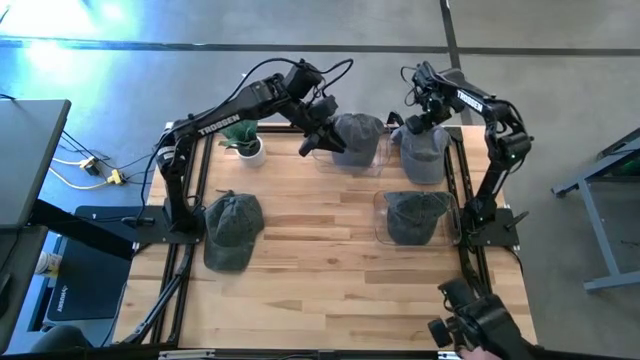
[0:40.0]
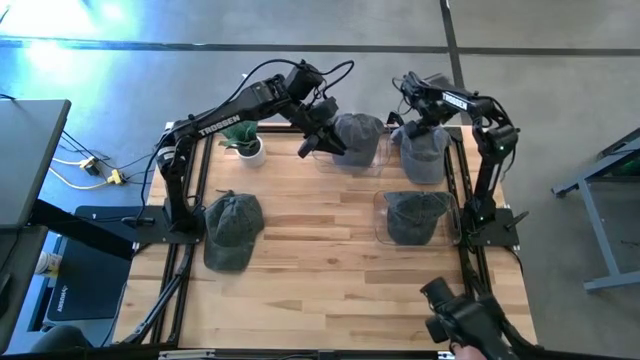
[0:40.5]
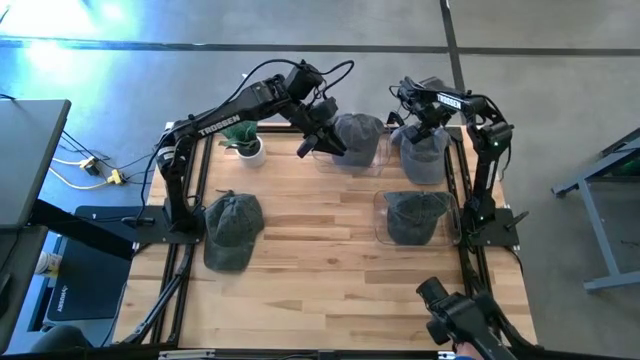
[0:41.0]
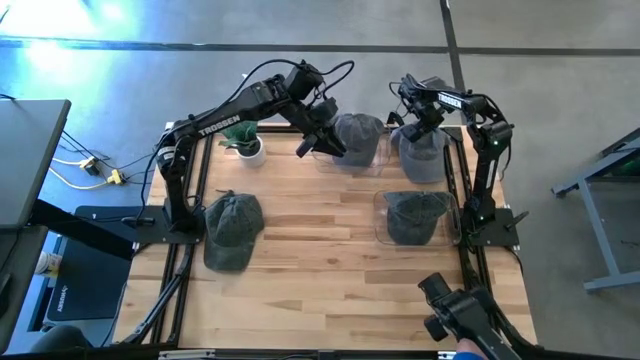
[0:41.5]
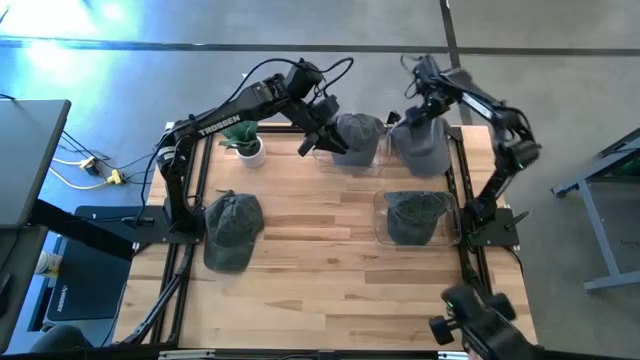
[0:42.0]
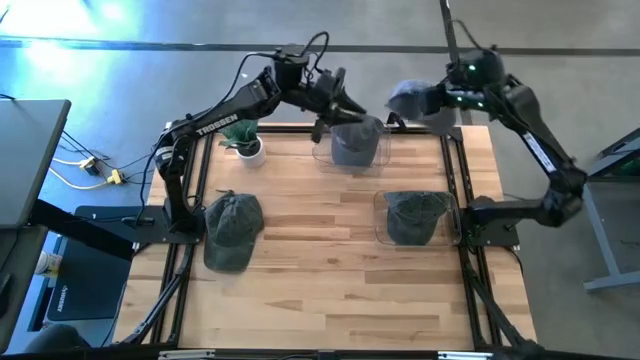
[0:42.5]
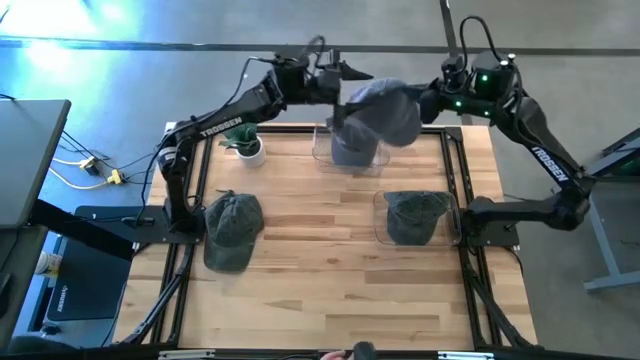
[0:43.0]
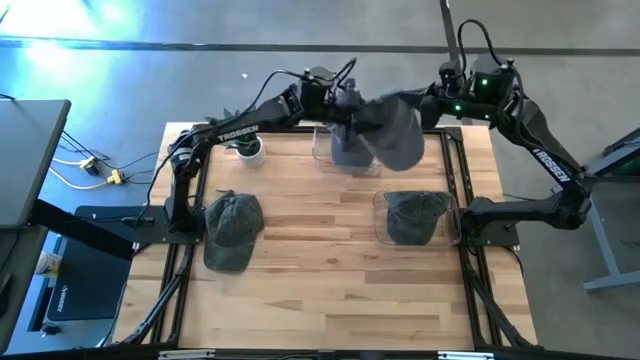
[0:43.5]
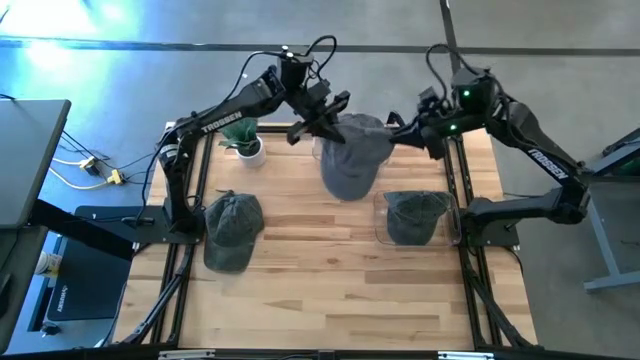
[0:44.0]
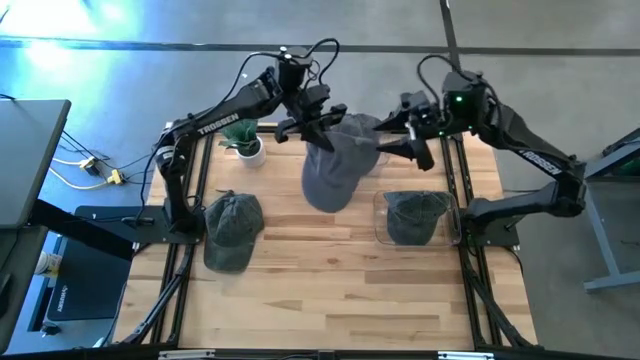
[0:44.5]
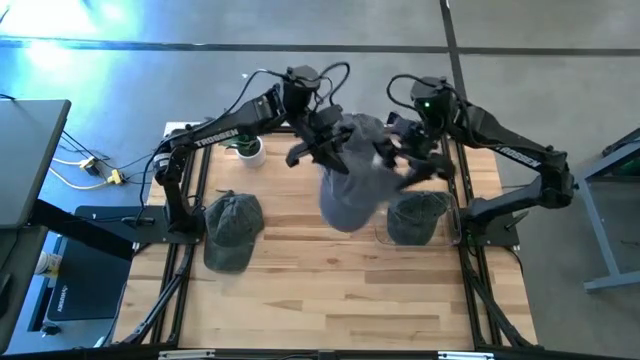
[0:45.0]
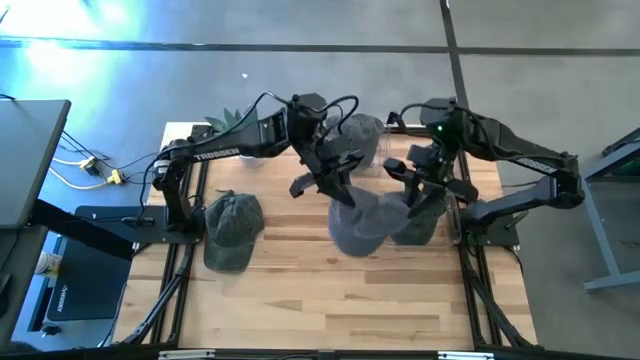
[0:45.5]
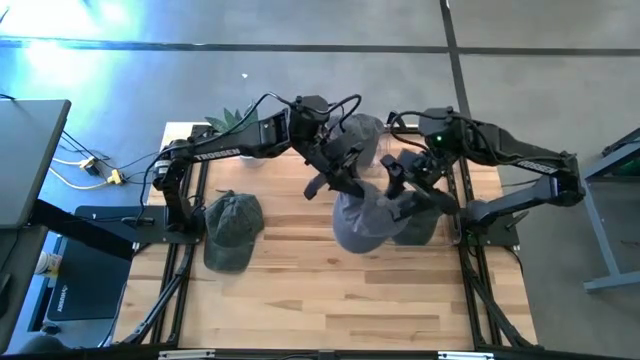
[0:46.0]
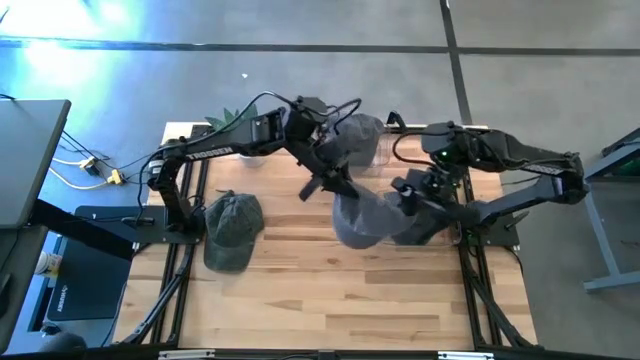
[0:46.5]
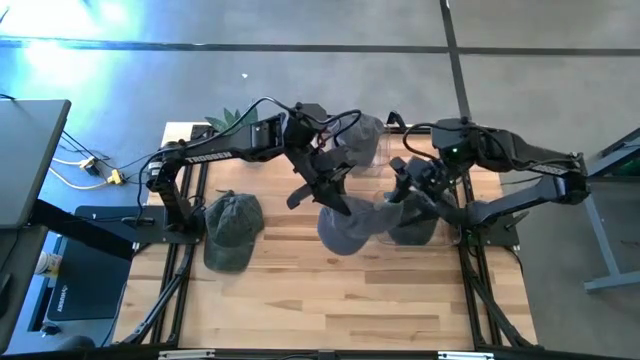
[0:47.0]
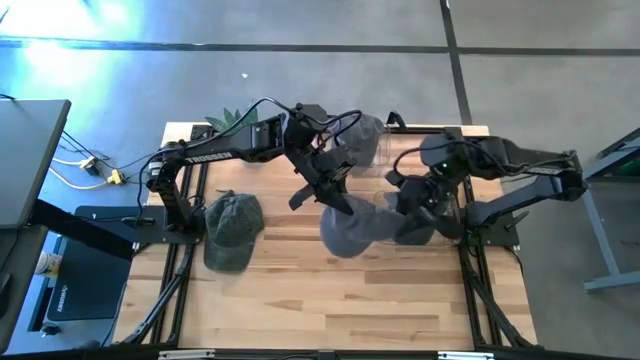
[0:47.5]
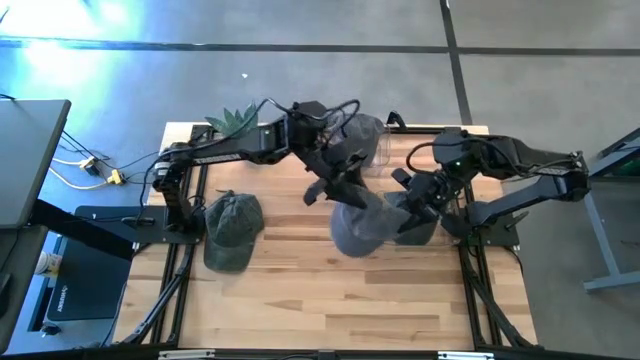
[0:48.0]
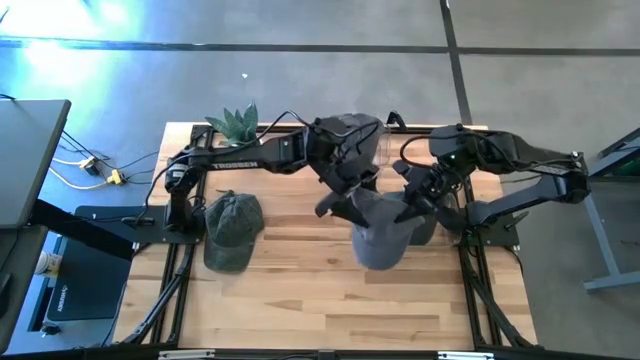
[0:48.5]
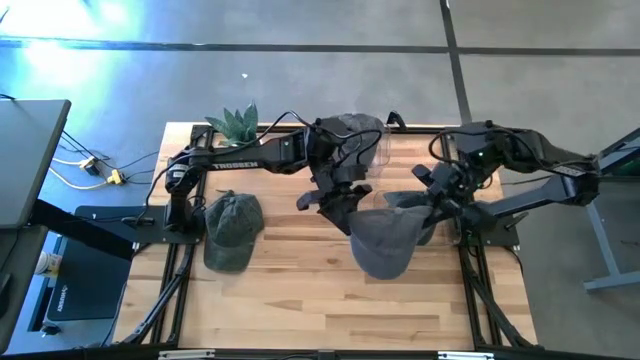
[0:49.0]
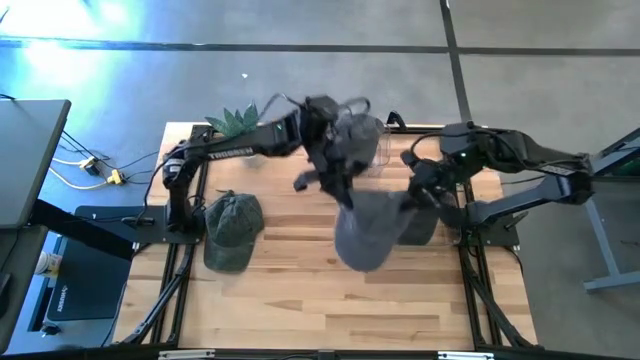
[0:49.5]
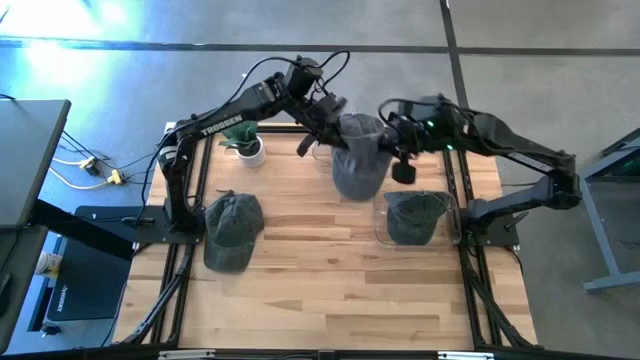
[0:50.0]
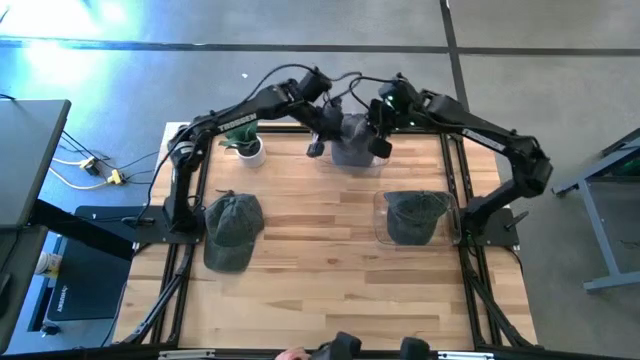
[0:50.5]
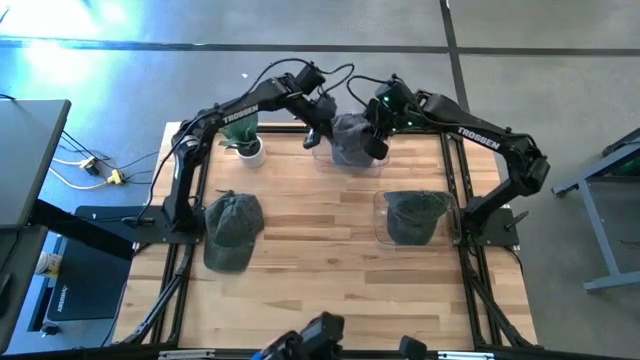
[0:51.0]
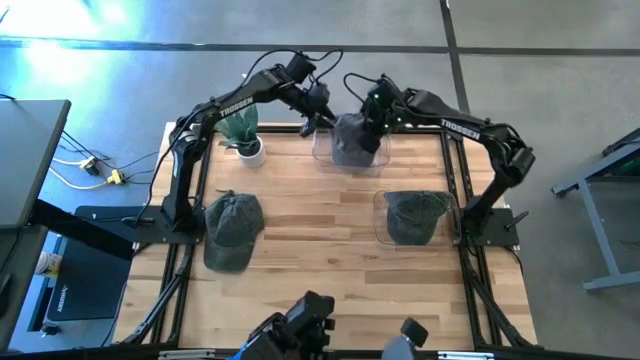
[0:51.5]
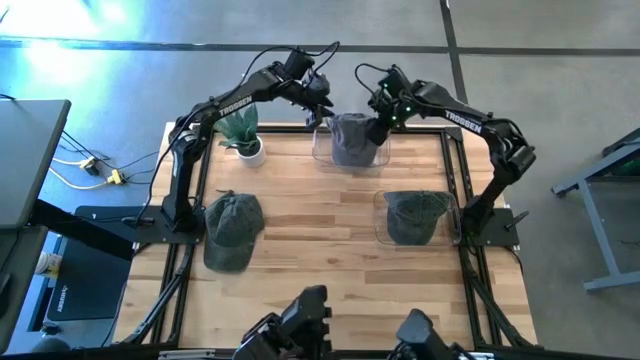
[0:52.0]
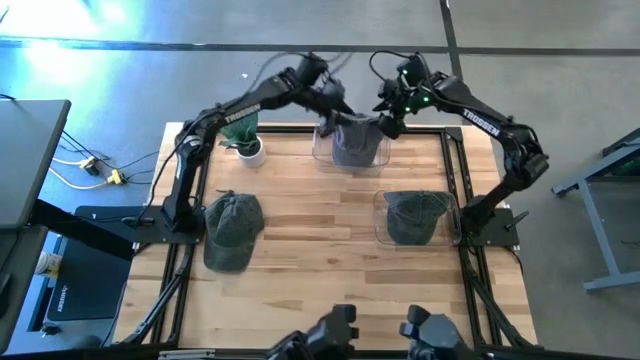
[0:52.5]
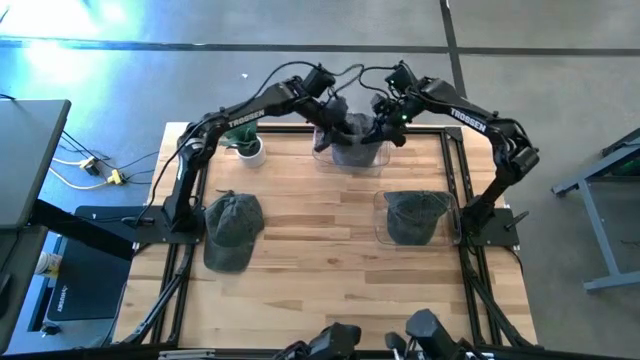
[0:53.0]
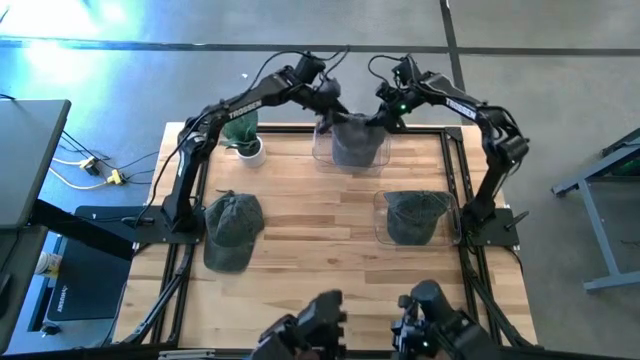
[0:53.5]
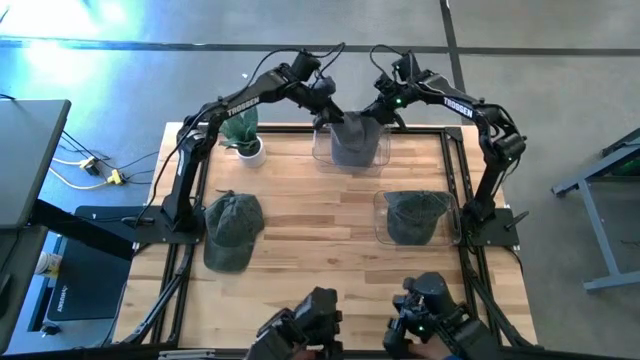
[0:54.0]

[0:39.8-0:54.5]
Task: Pick & Place hat
Put the gray cap into the top transparent bin

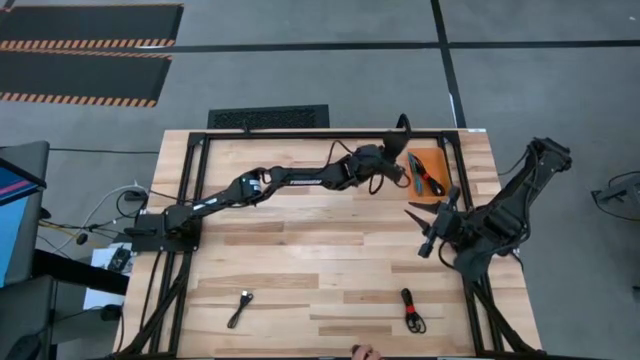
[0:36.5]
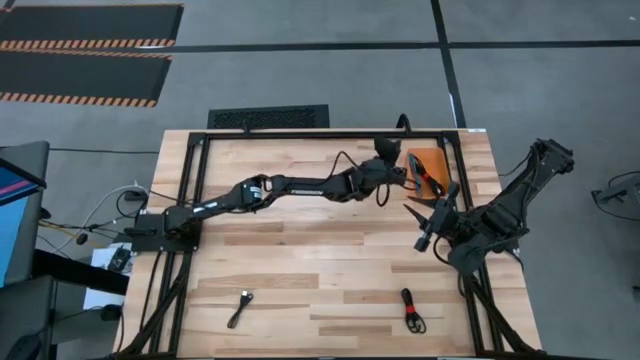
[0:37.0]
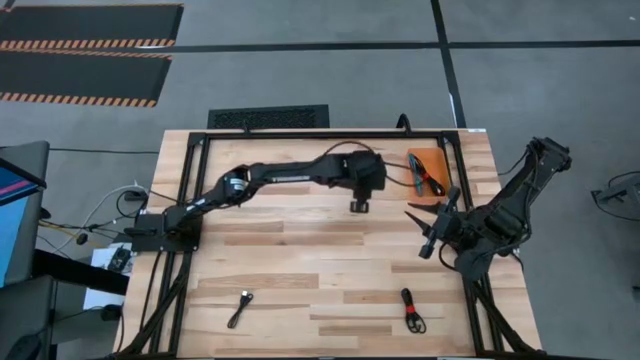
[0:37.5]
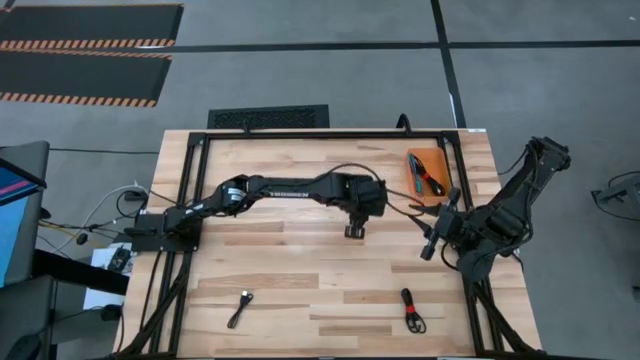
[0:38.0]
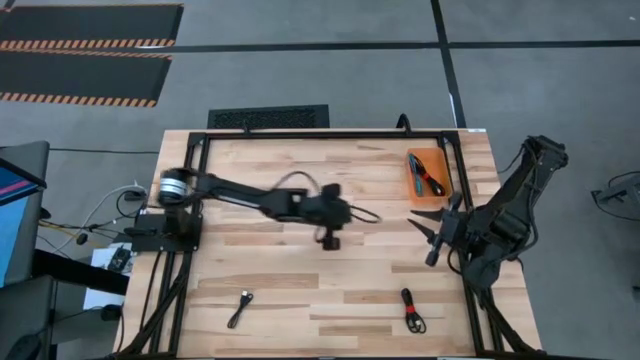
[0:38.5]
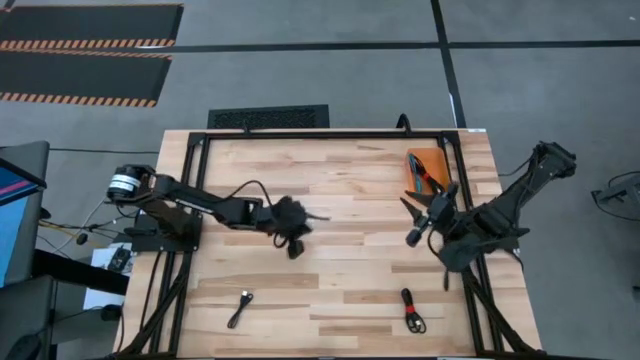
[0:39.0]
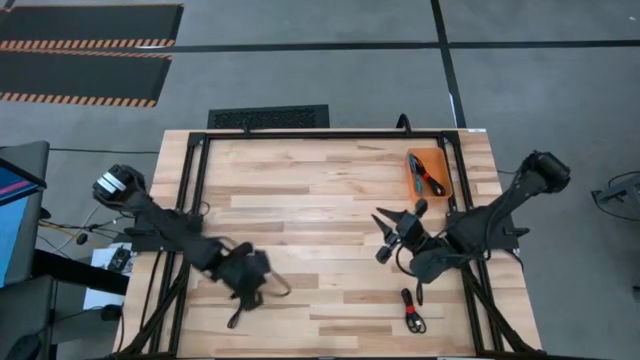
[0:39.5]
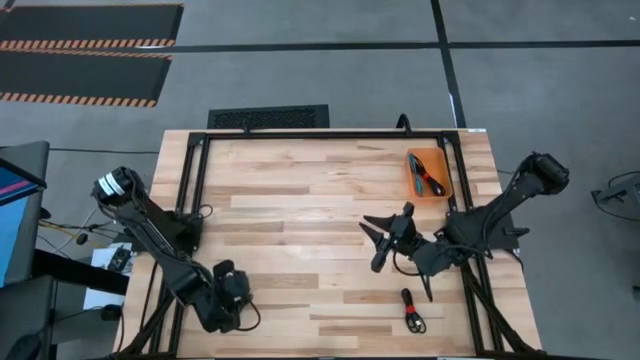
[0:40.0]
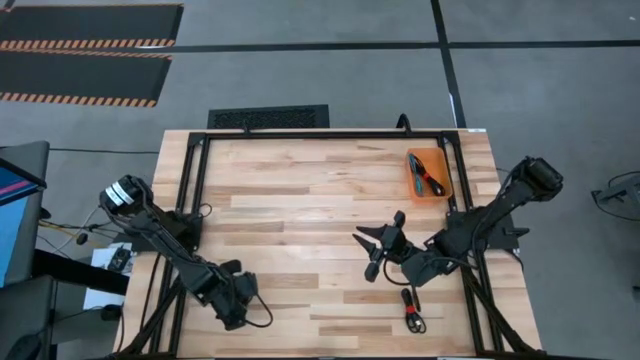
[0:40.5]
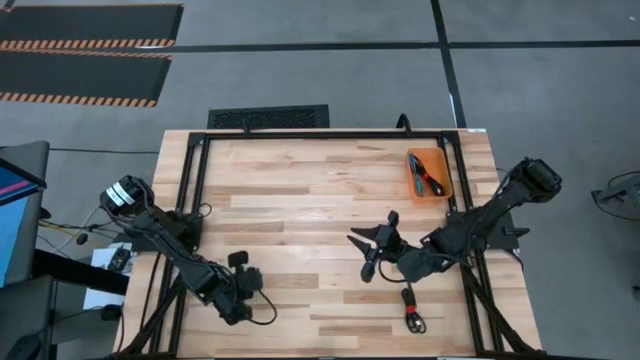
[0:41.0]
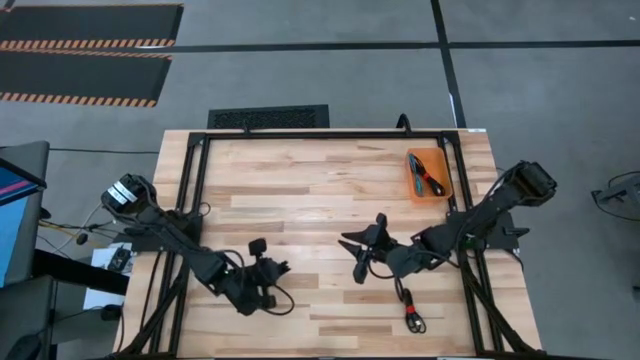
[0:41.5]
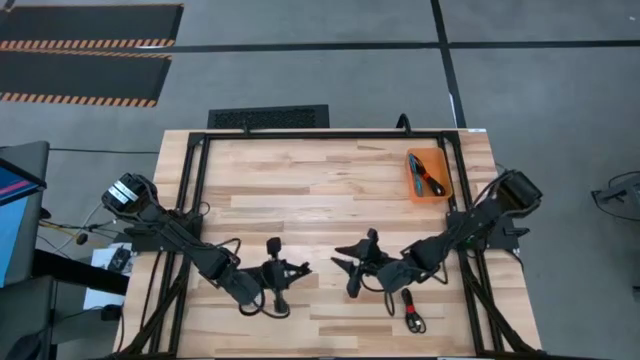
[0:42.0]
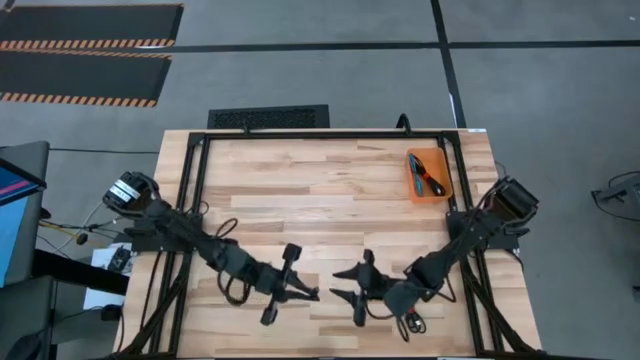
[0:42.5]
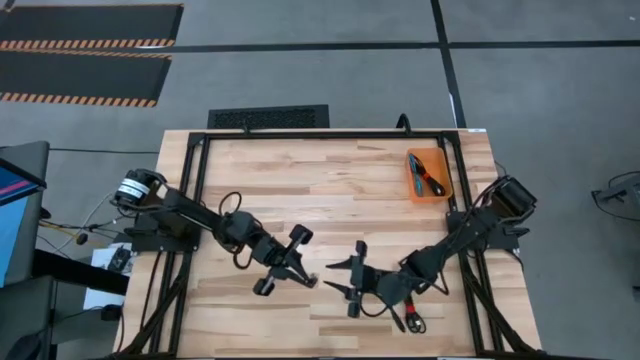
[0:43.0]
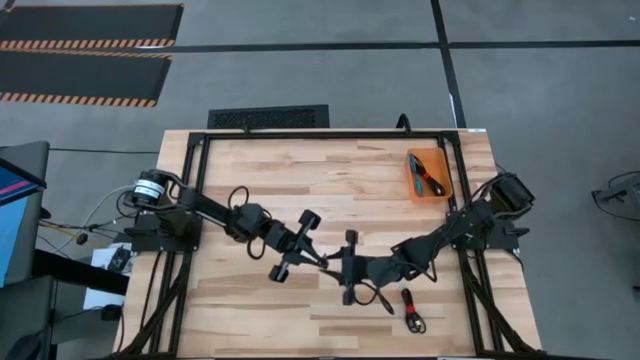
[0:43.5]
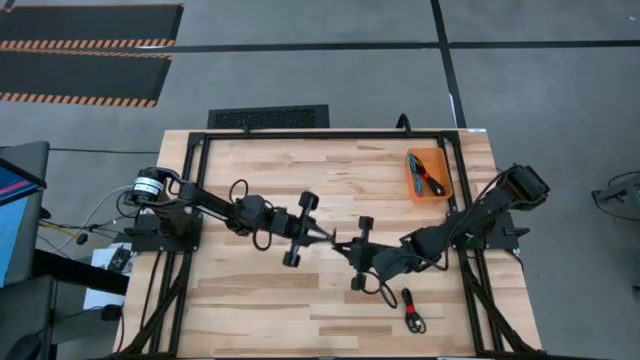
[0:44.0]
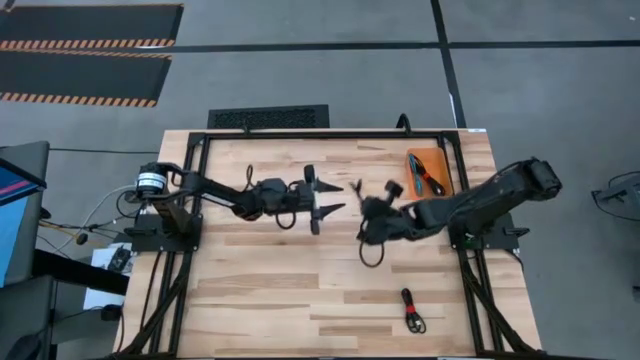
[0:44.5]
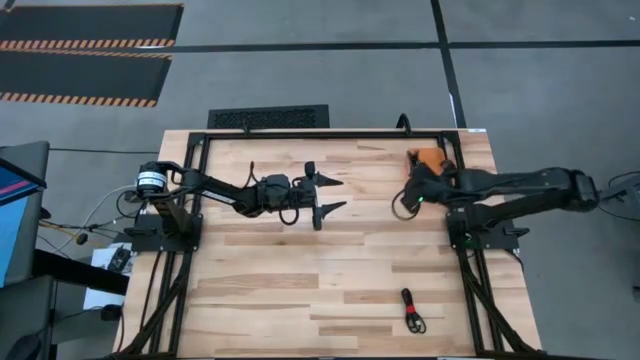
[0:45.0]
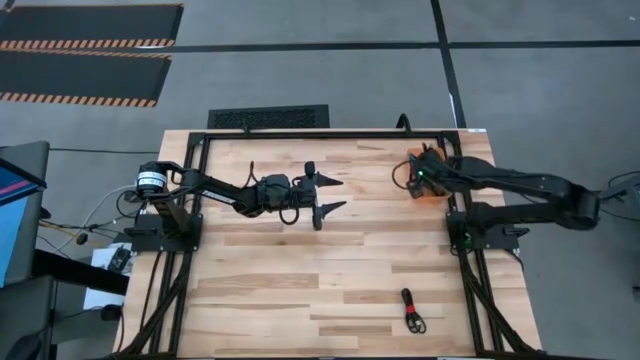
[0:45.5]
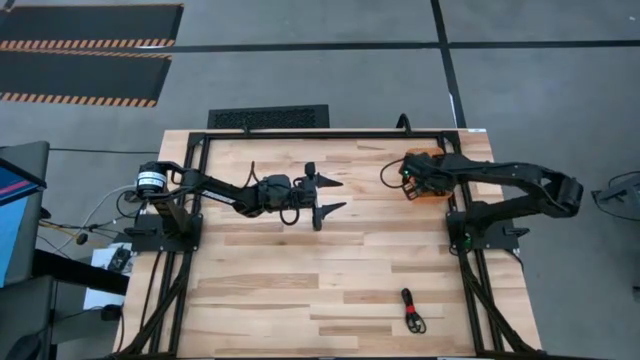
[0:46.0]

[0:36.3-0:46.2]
Task: Pick and place USB-C Cables
Put the left black charger cable into the orange bin
